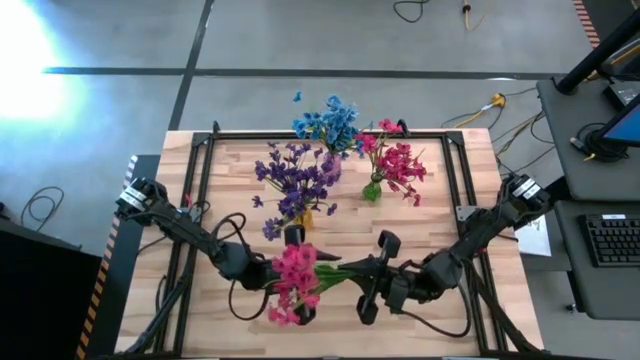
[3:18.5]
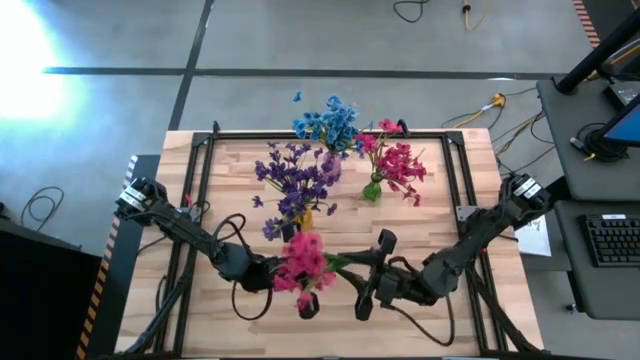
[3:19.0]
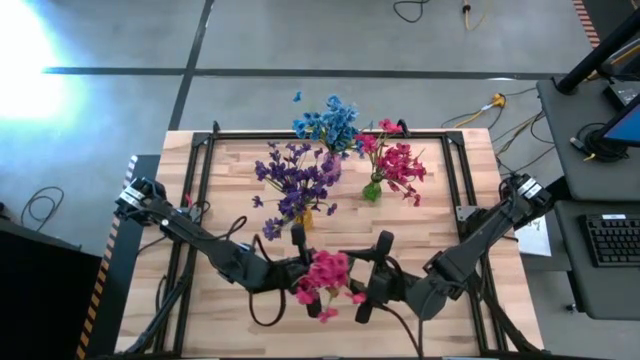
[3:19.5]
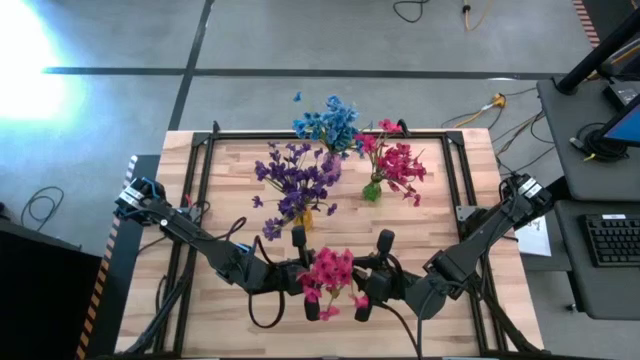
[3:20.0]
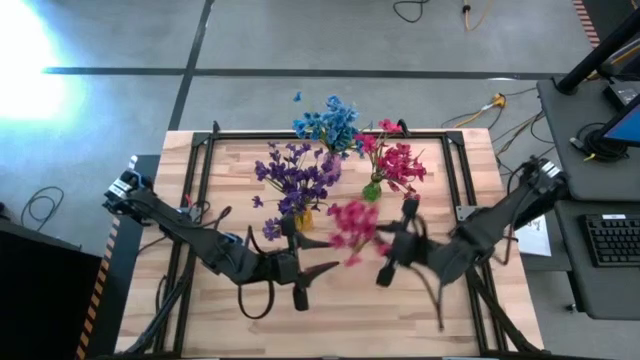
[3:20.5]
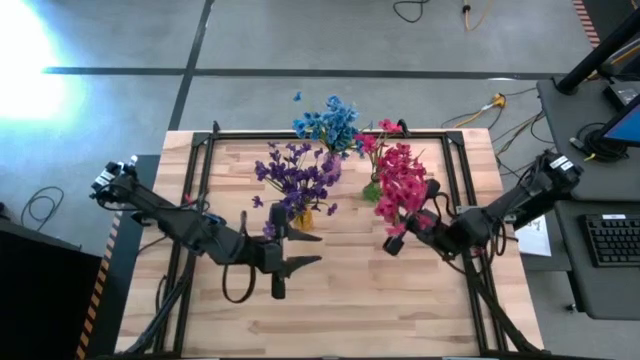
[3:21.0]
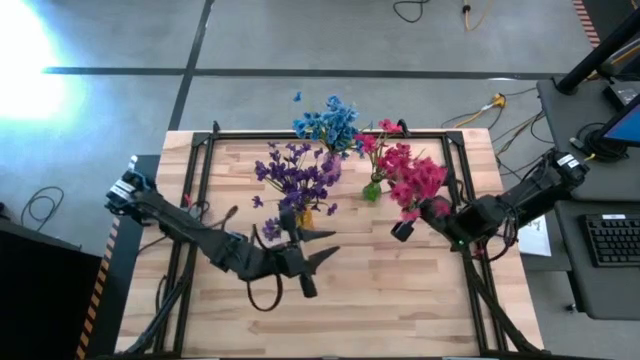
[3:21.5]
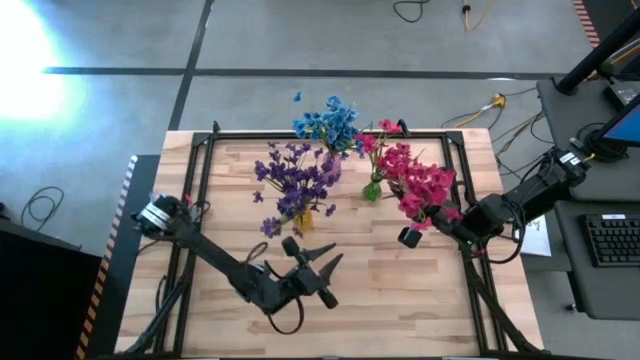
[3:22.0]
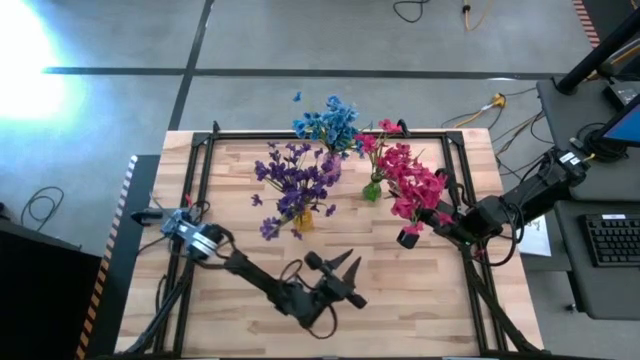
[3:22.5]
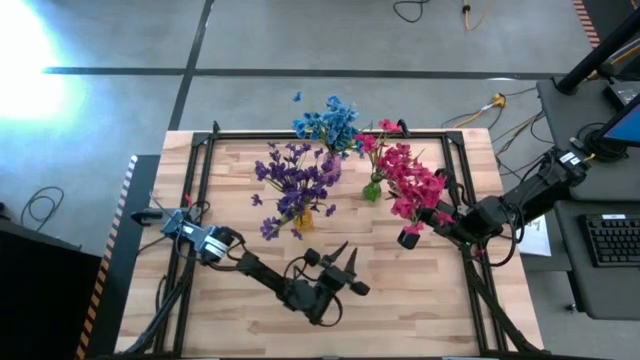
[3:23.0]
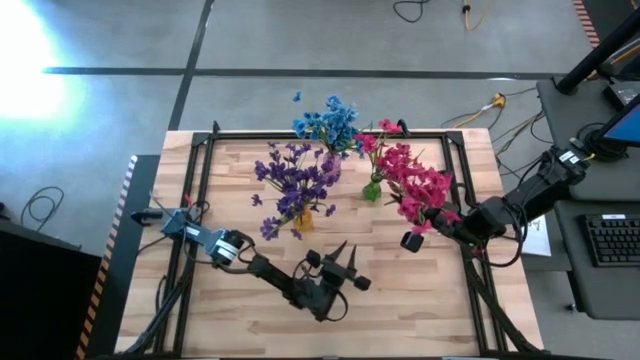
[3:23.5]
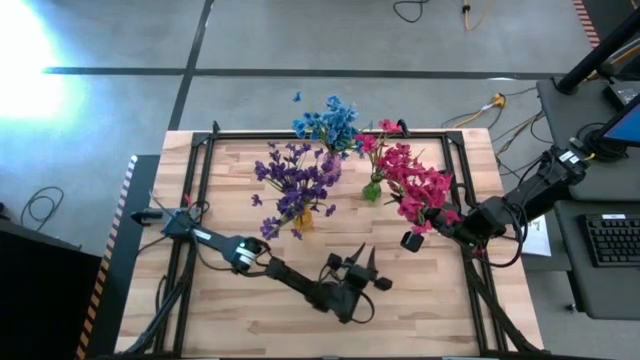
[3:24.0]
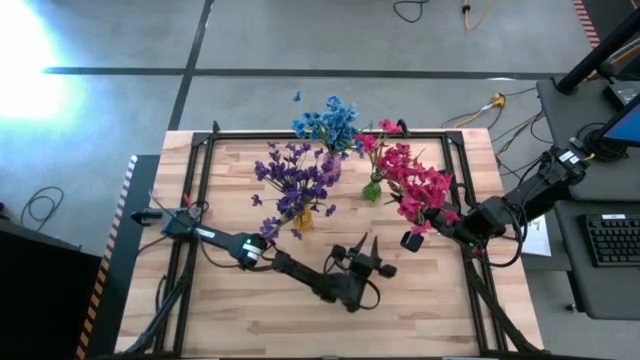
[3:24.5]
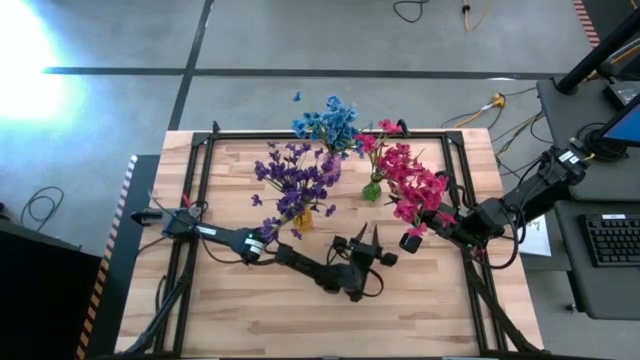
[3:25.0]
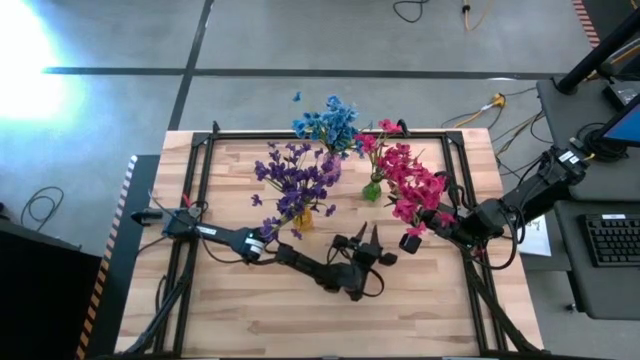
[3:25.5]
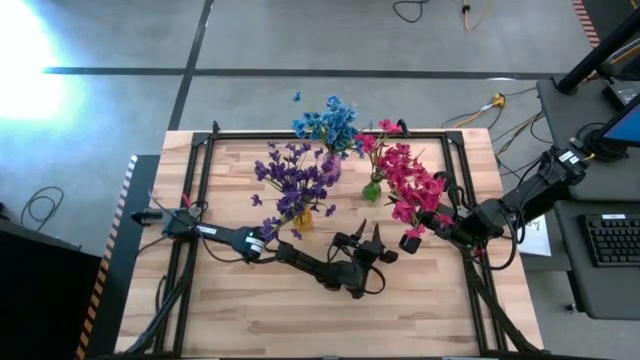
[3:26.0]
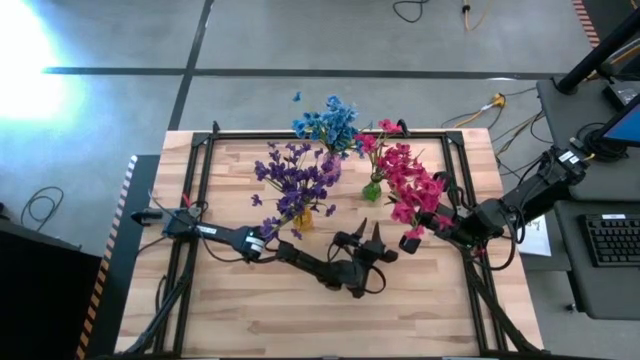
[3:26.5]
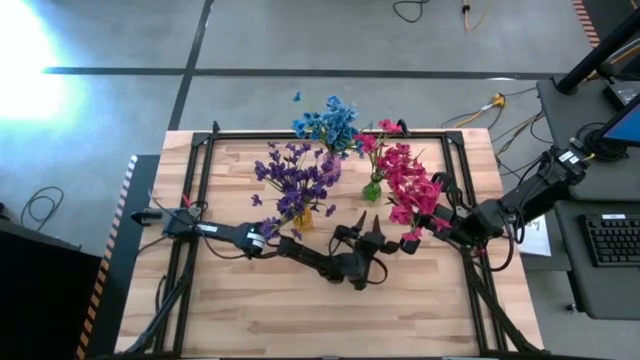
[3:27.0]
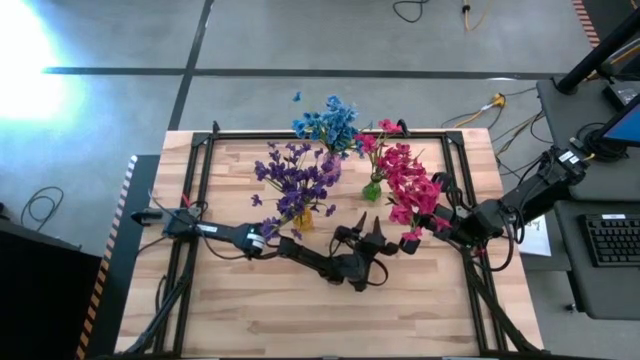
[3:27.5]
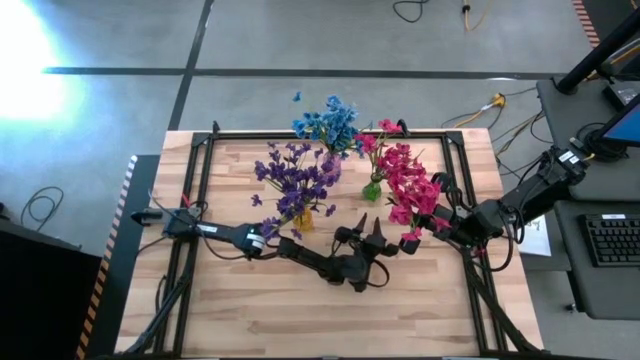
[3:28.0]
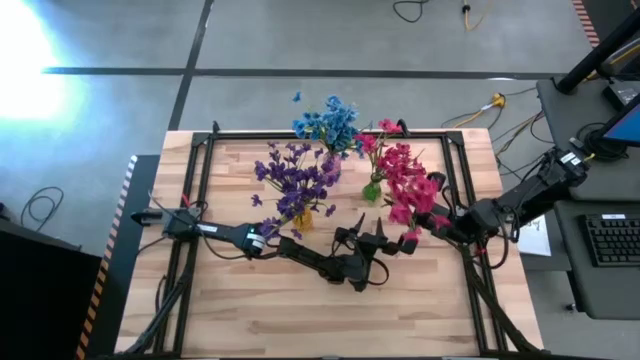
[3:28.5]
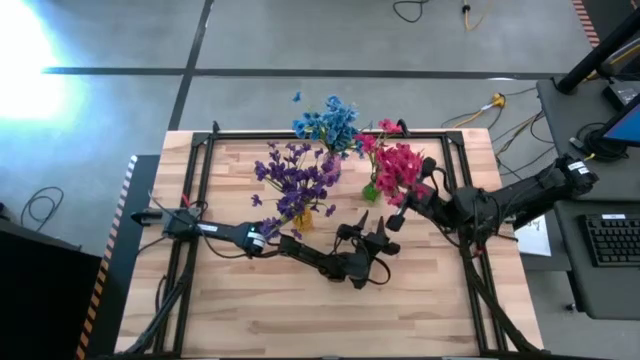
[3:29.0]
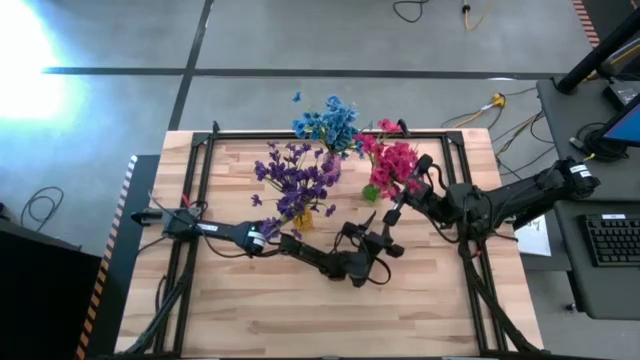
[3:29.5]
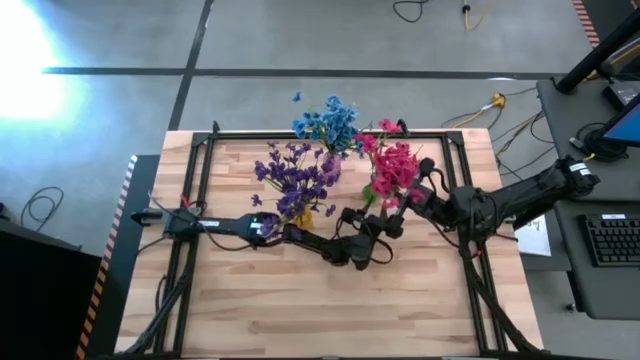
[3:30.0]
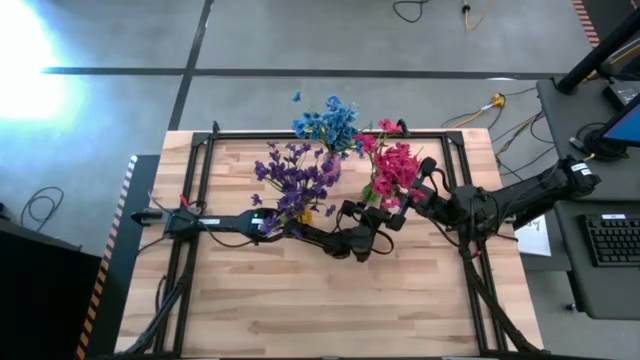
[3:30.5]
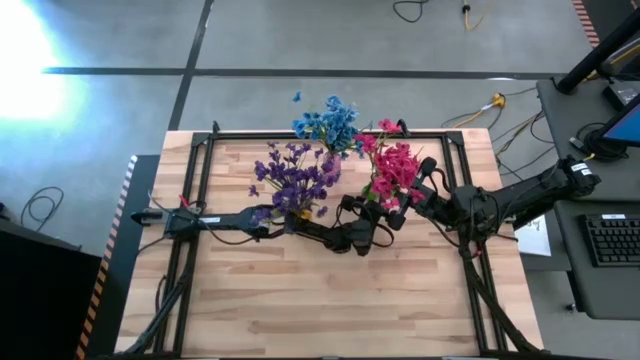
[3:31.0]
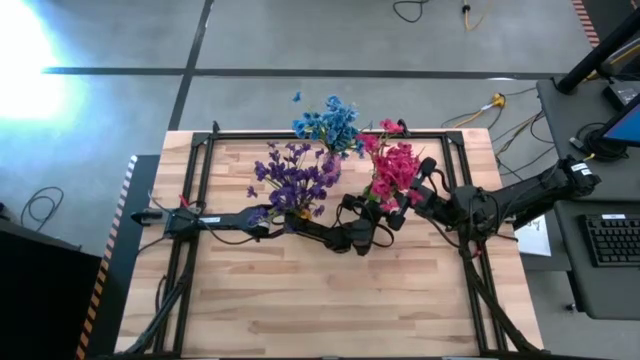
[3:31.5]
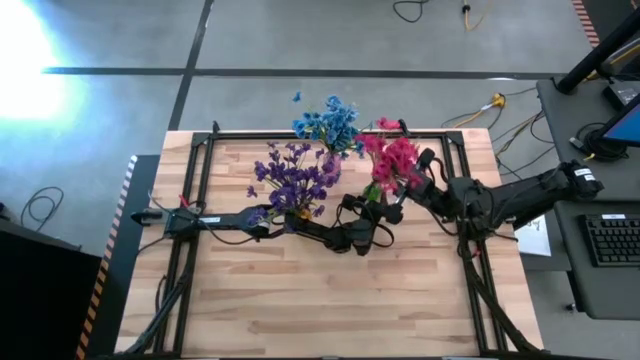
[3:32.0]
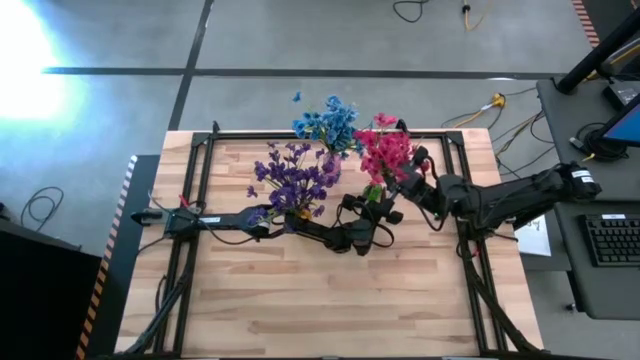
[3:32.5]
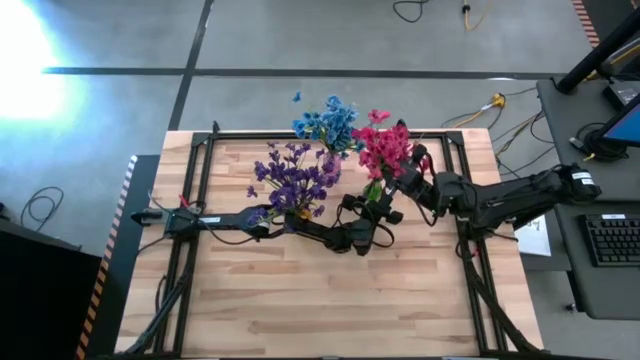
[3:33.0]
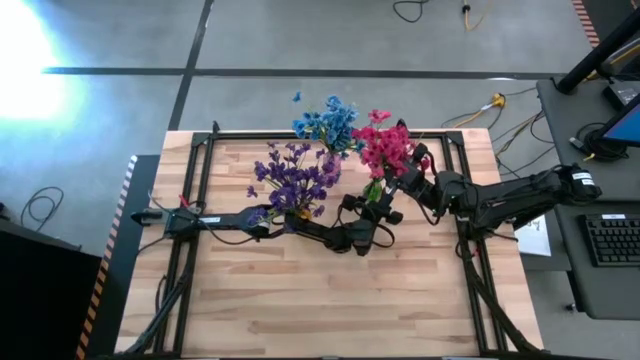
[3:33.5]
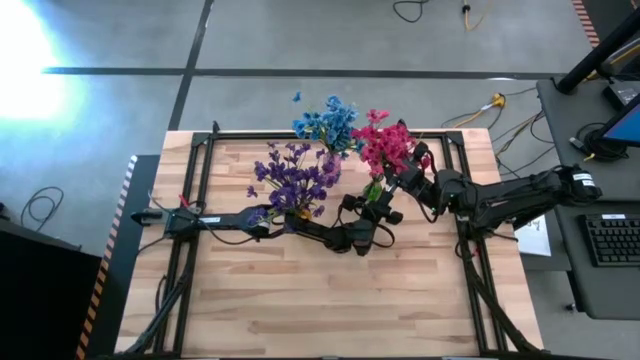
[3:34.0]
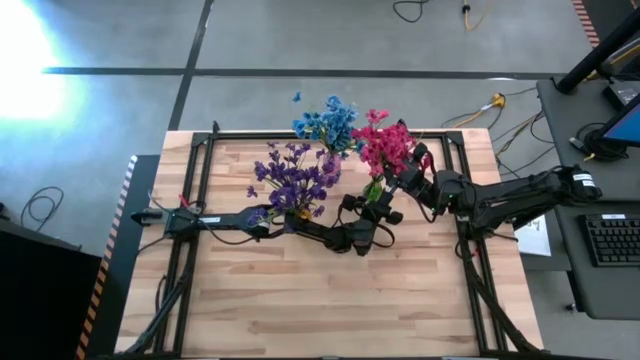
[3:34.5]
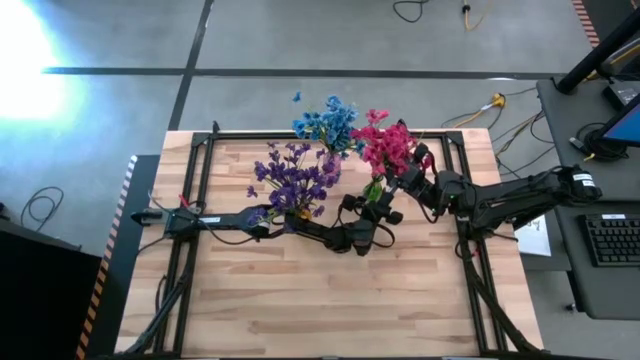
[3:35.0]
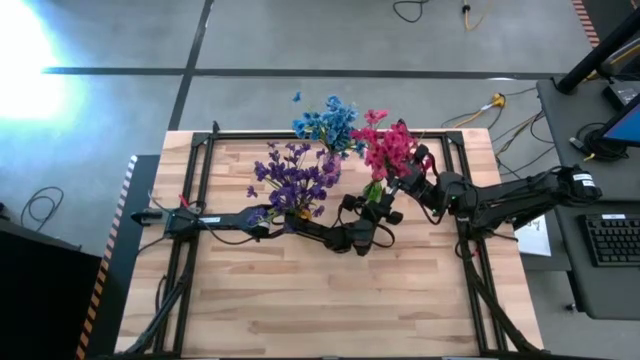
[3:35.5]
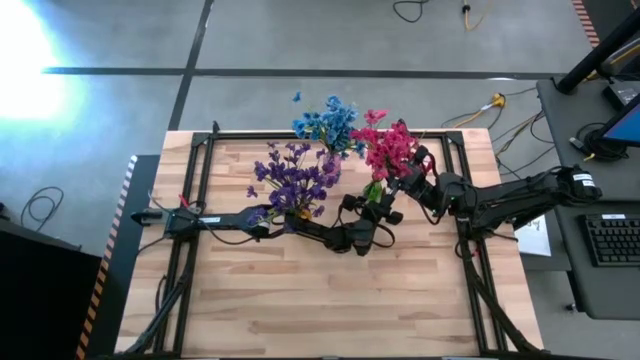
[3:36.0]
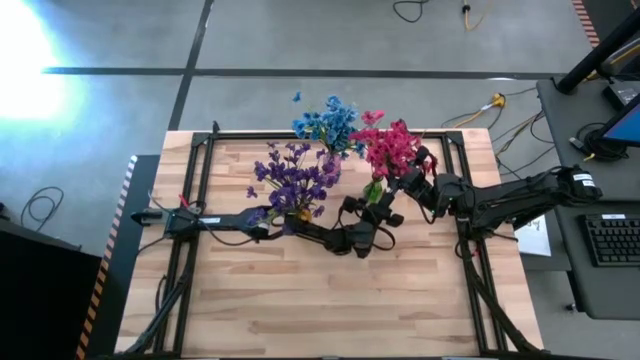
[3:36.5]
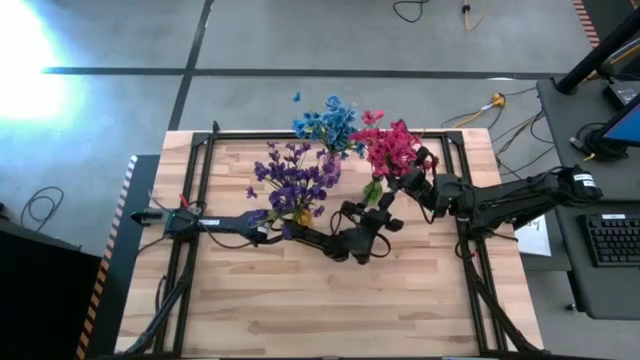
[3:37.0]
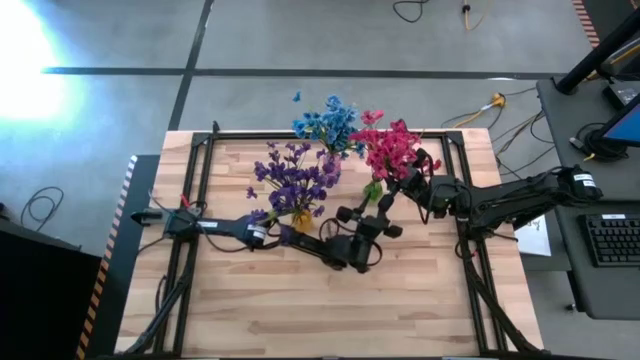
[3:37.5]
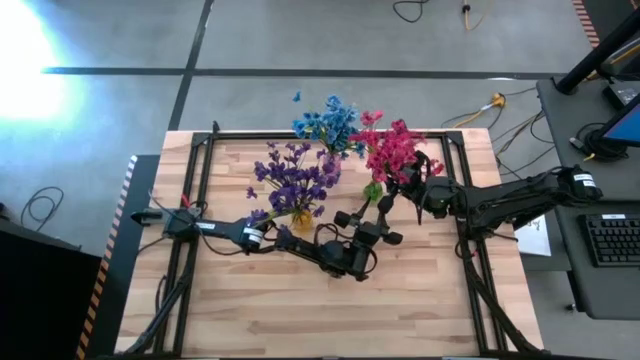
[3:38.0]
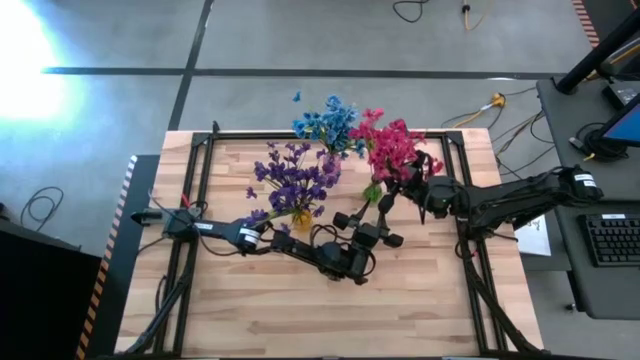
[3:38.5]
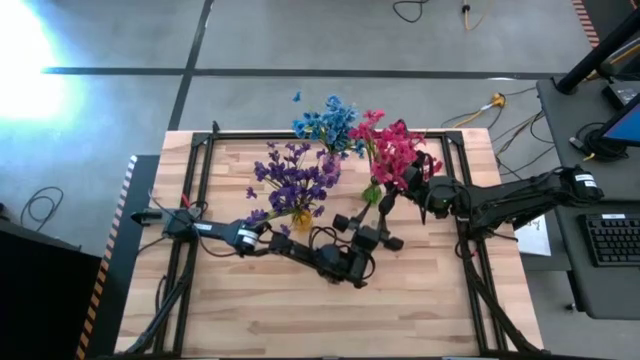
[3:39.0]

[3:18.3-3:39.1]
Task: Sort flowers into vase by color
Put the pink flowers into the green vase
